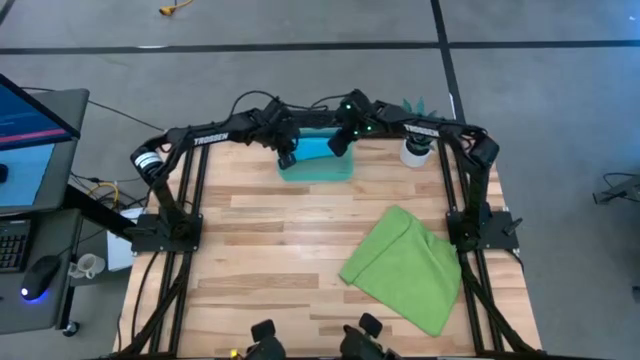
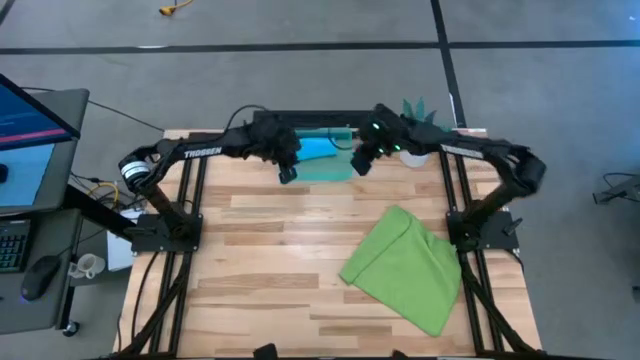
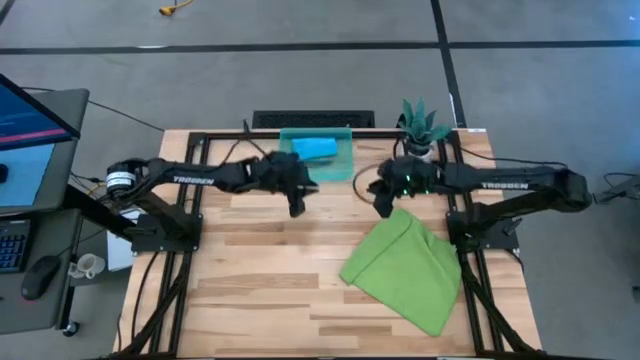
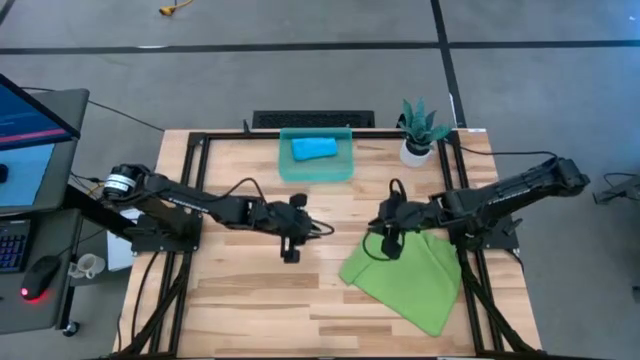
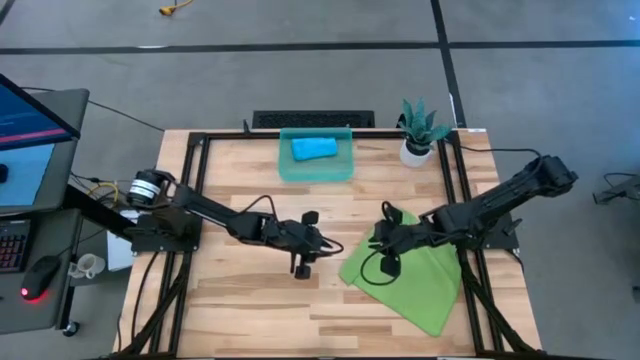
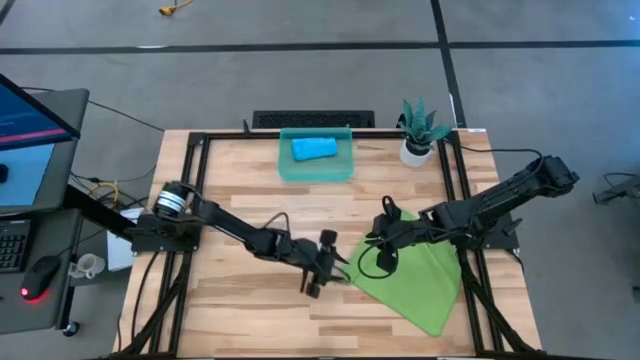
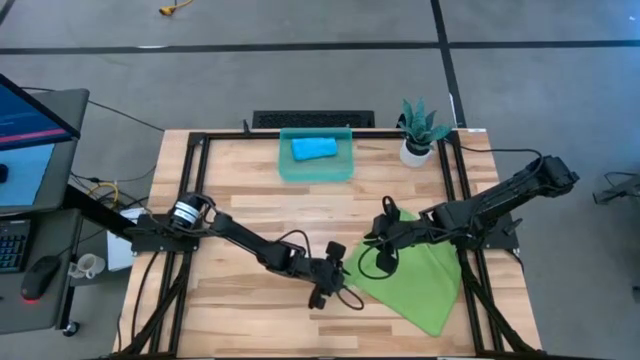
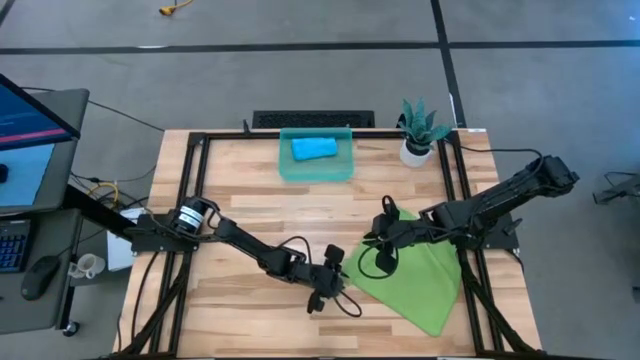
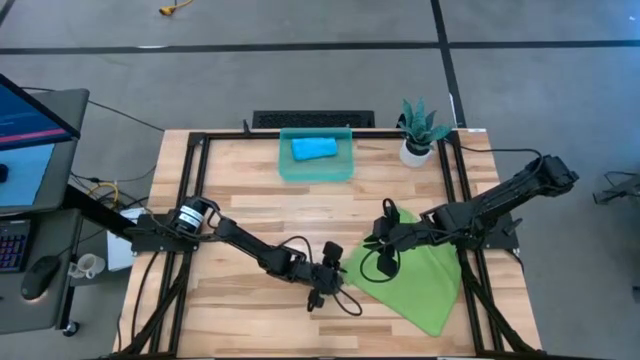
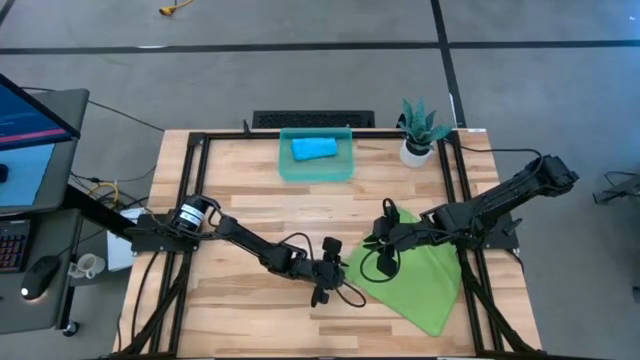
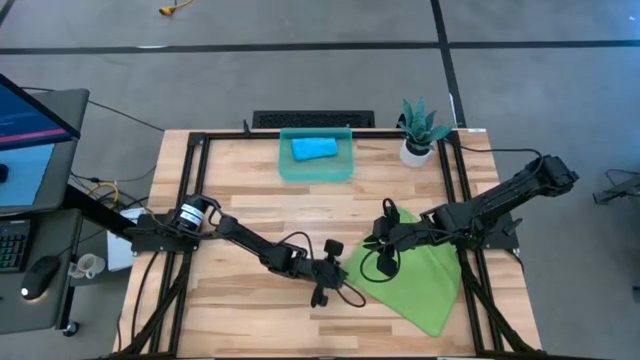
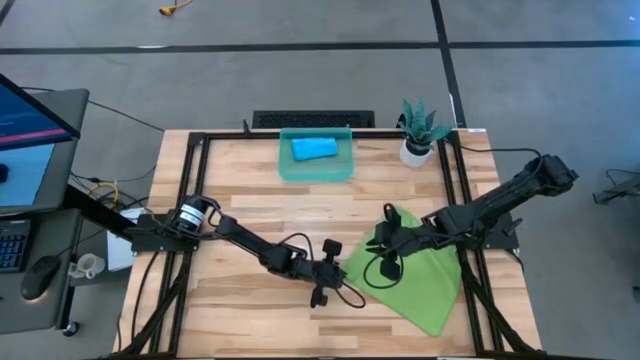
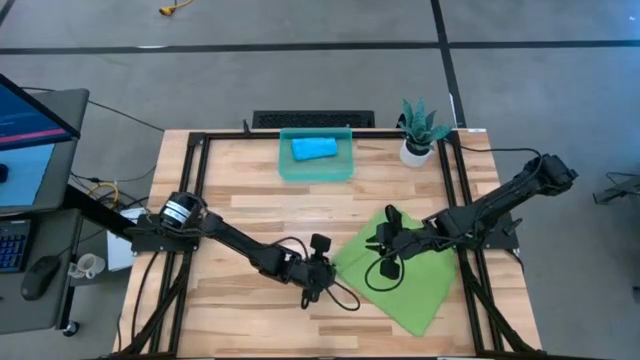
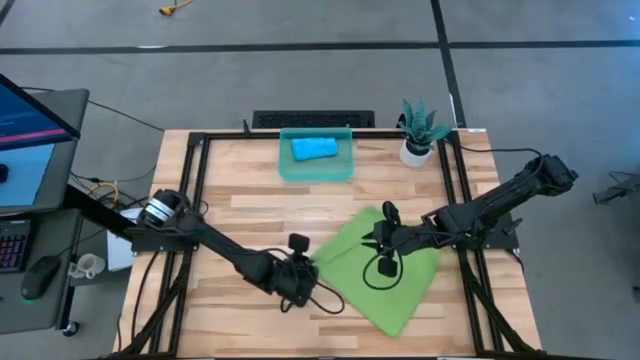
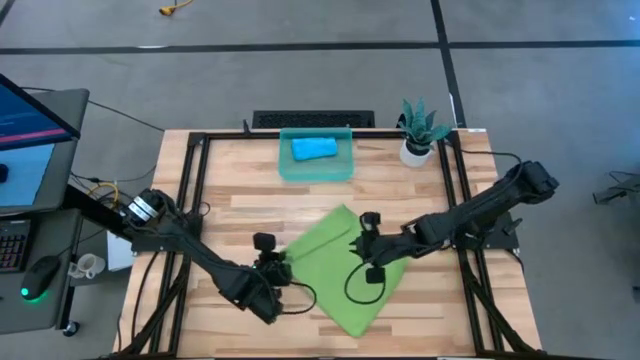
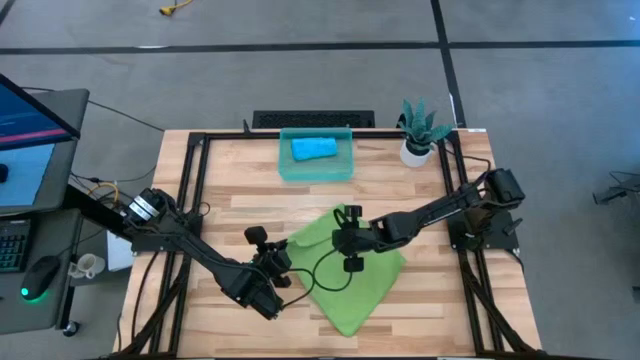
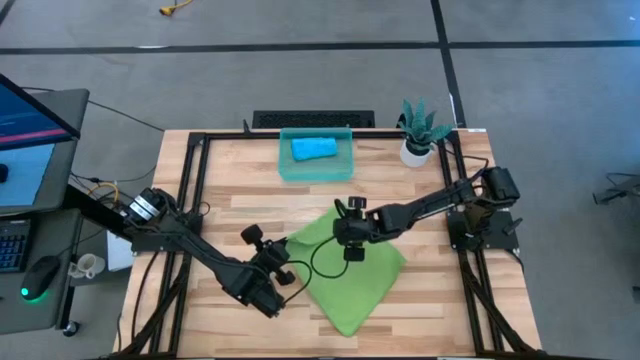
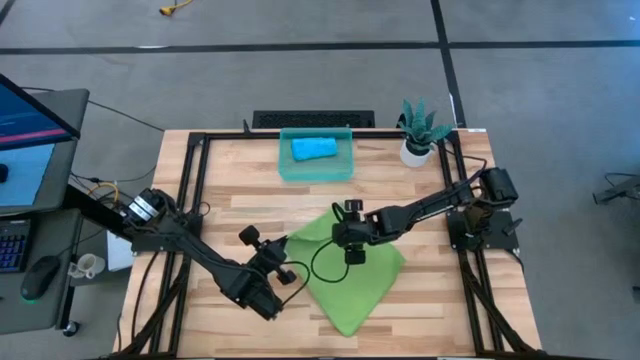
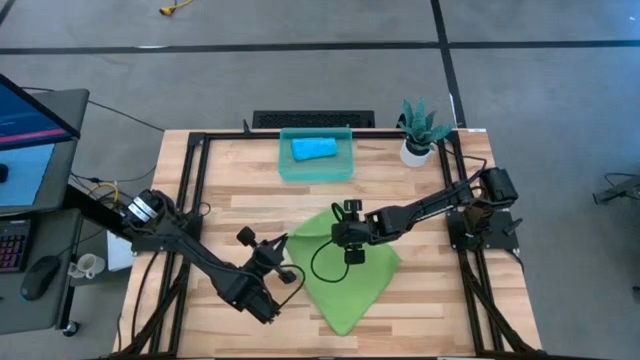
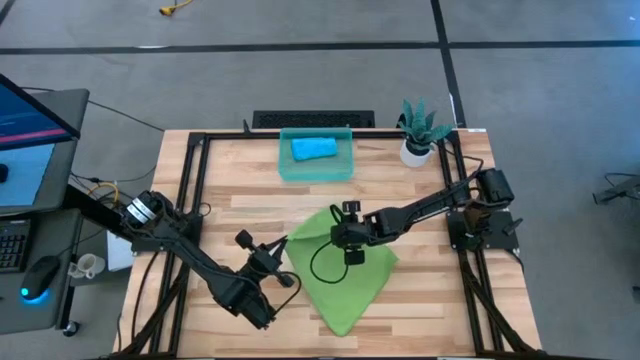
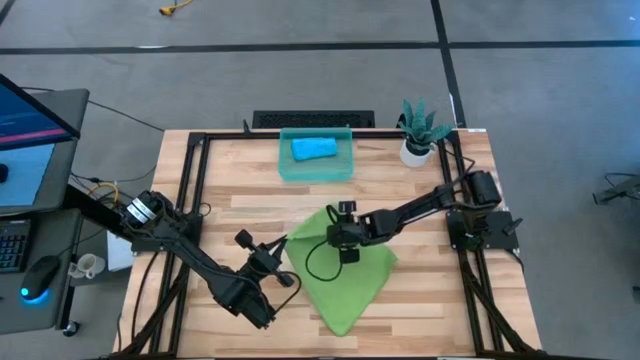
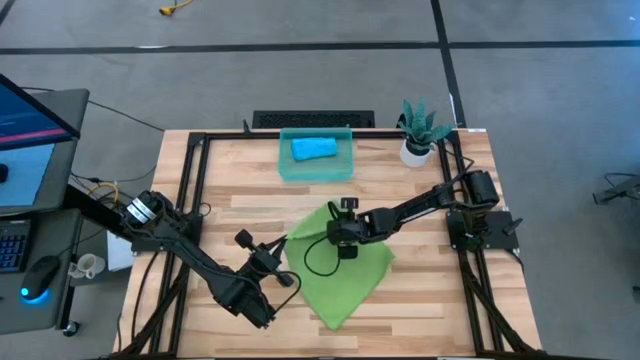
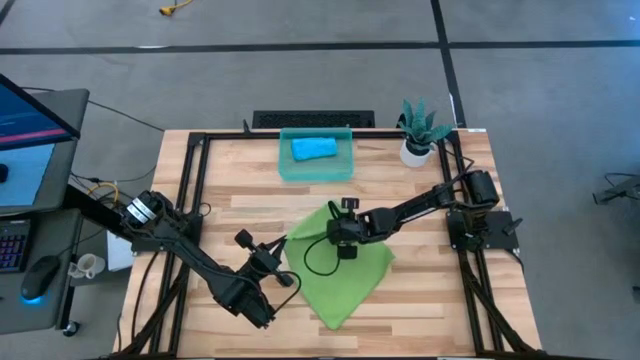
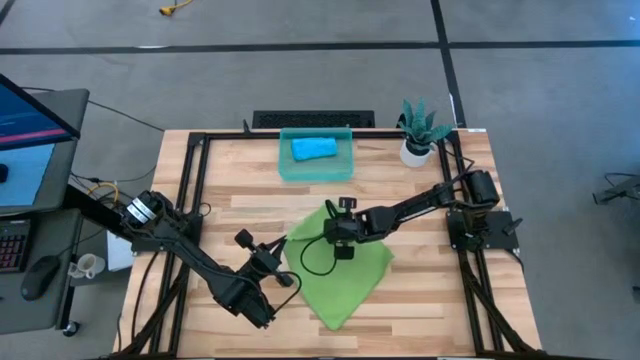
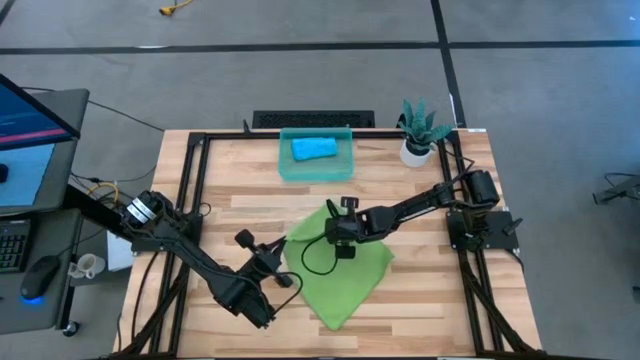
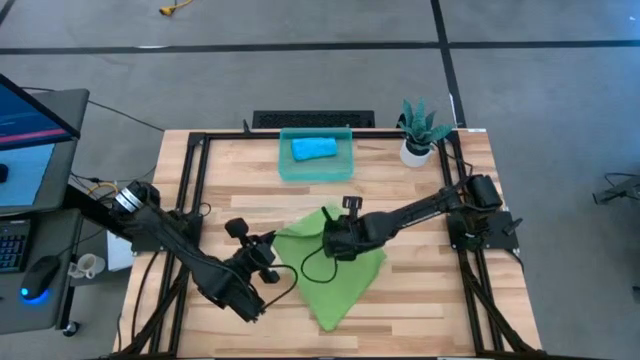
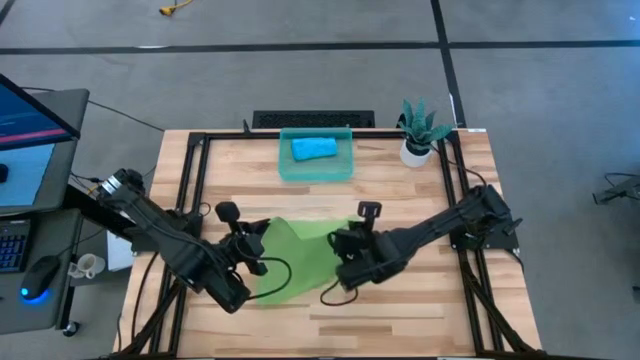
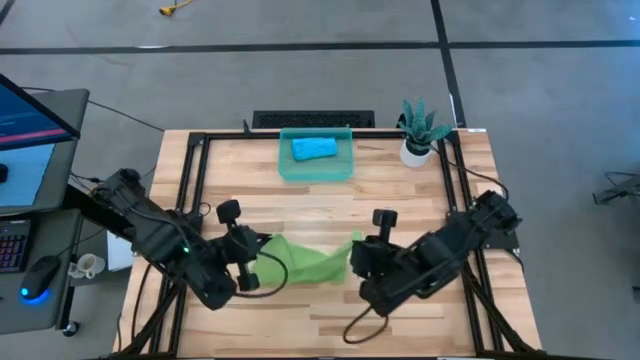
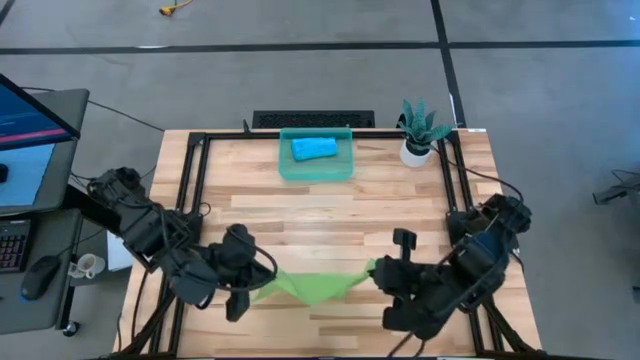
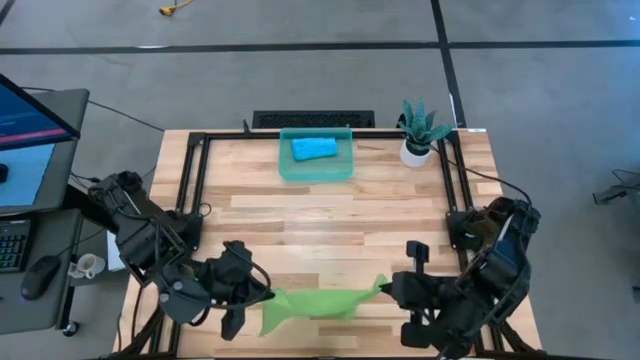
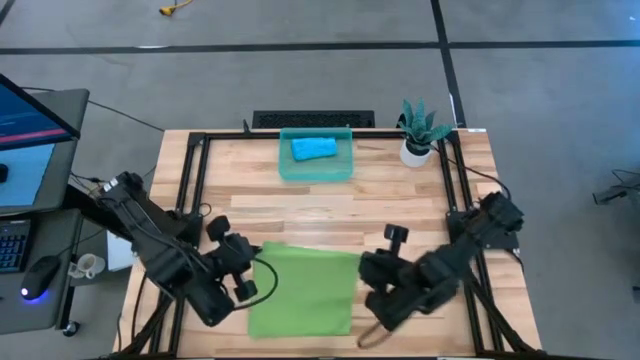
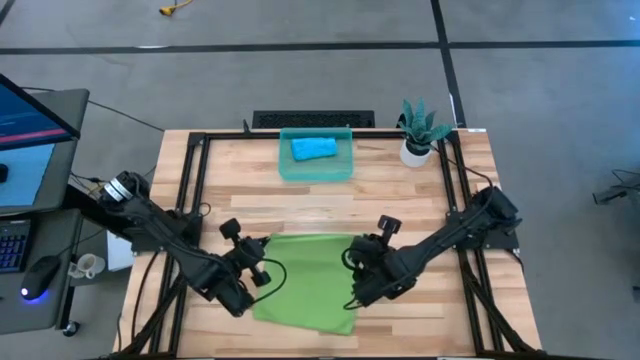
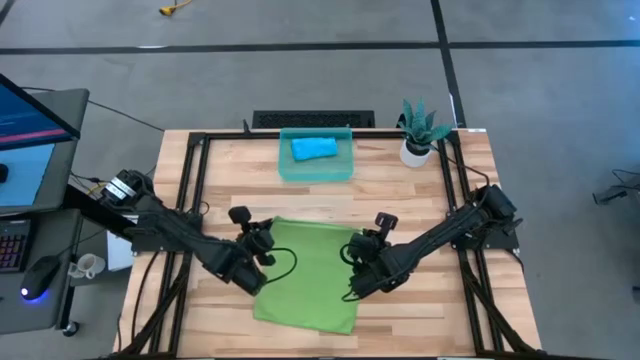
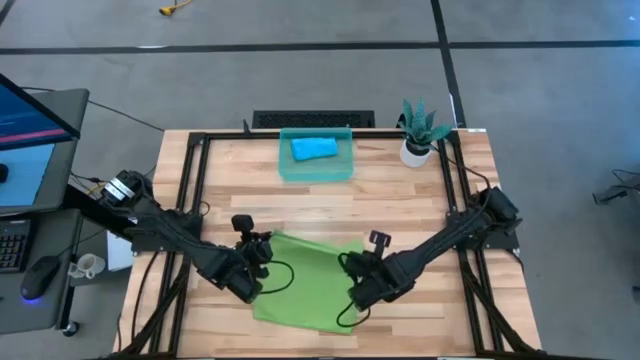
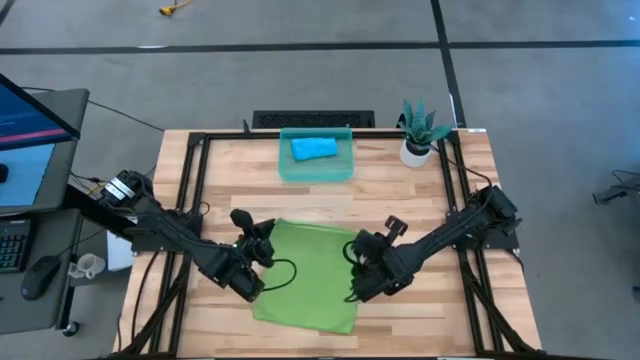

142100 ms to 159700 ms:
Task: Roll microfiber towels into tight, uniform cylinder then place into a basket
Fold the green microfiber cloth

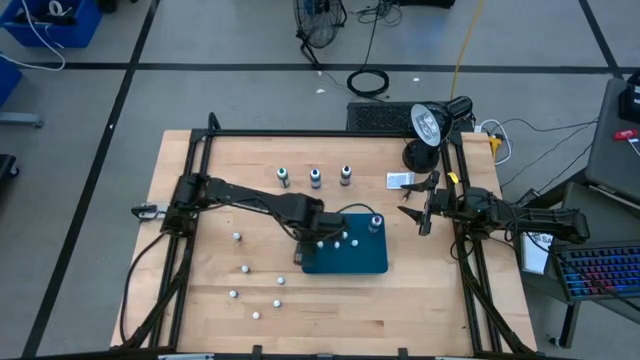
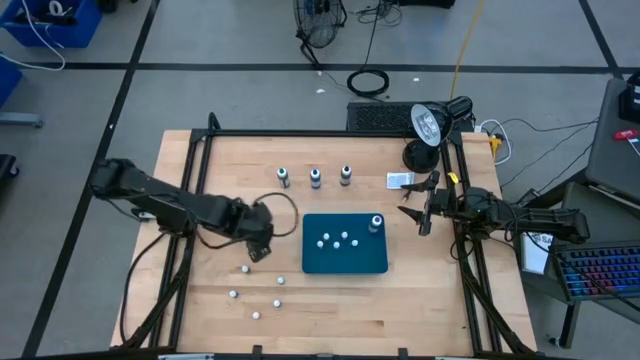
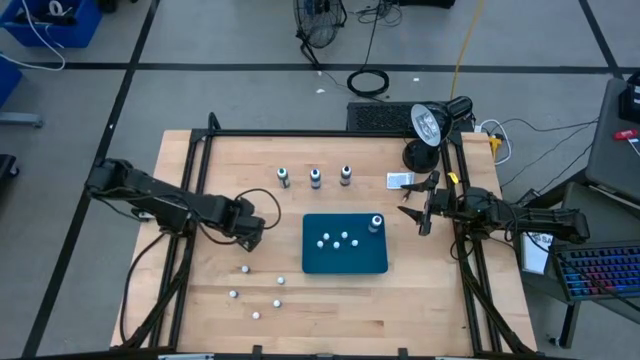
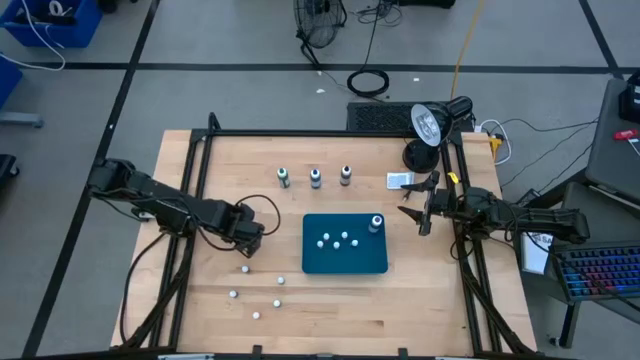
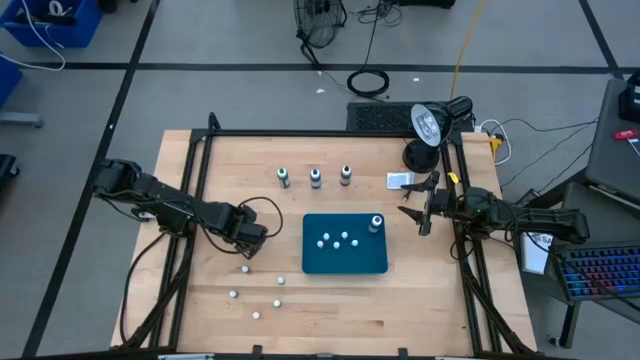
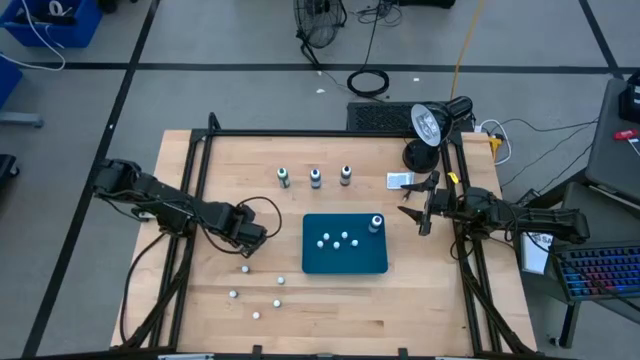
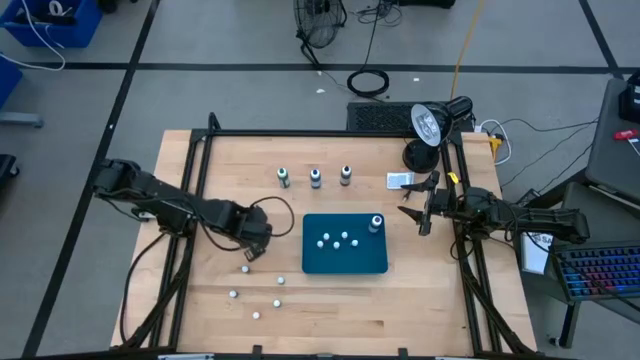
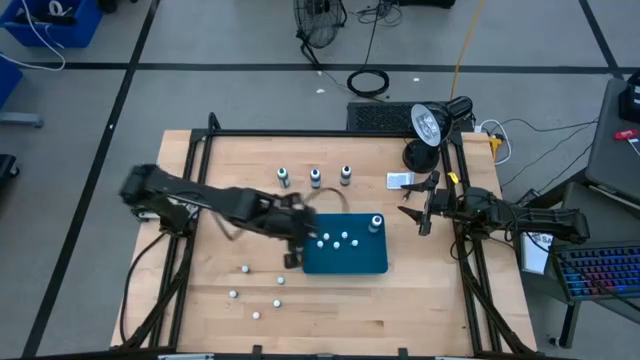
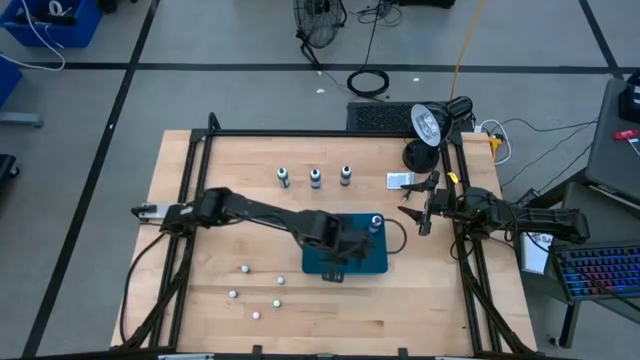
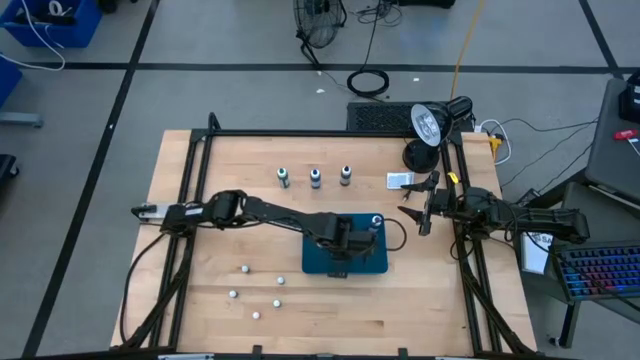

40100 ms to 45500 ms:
Task: Pick & Place food coloring
Put the top small purple food coloring bottle into the blue bin
